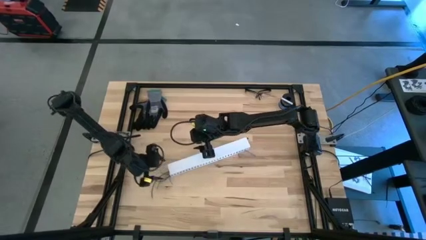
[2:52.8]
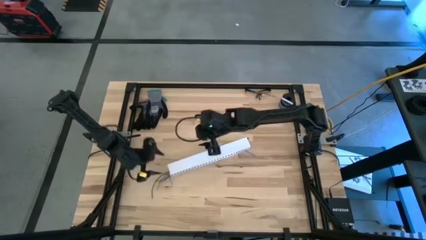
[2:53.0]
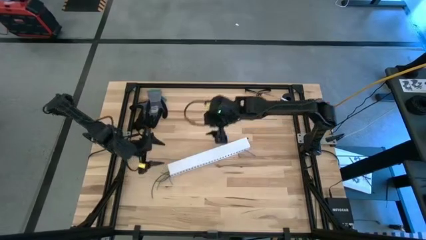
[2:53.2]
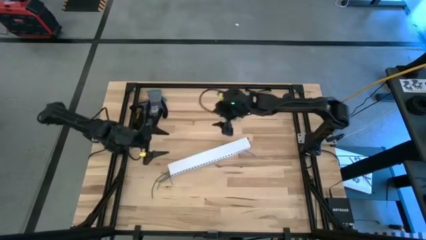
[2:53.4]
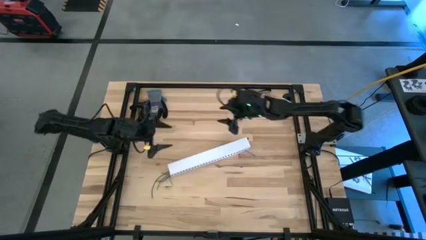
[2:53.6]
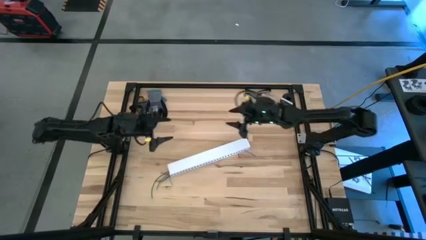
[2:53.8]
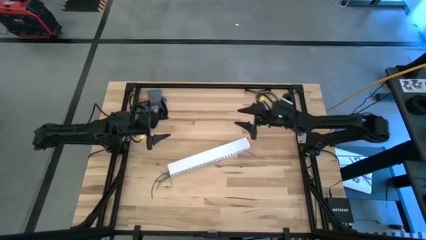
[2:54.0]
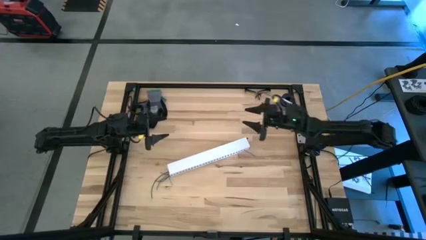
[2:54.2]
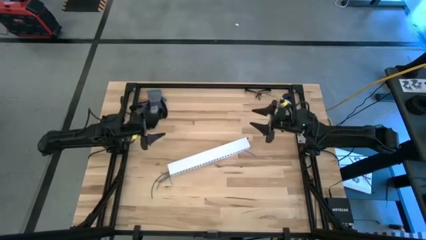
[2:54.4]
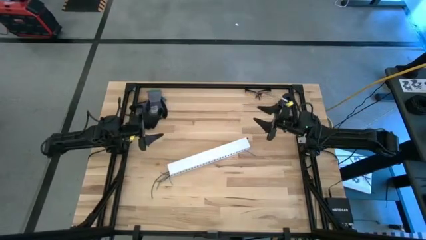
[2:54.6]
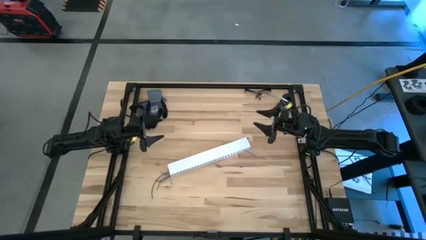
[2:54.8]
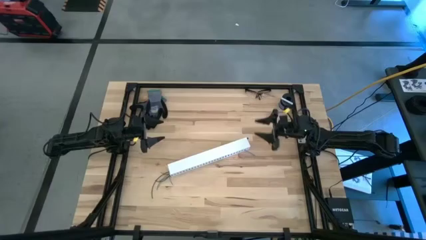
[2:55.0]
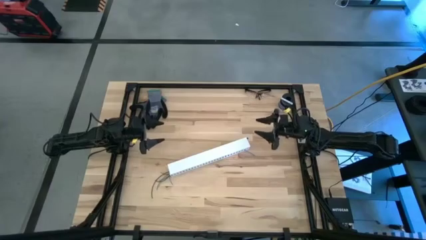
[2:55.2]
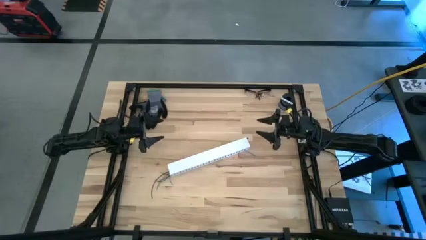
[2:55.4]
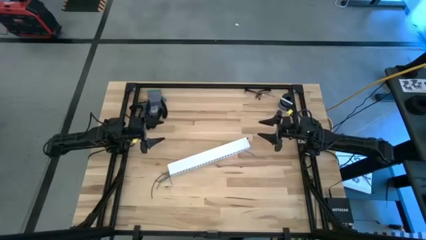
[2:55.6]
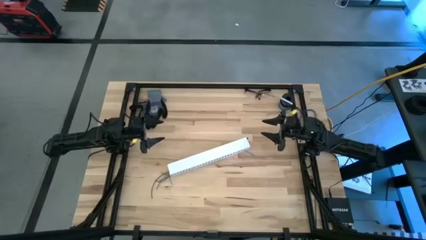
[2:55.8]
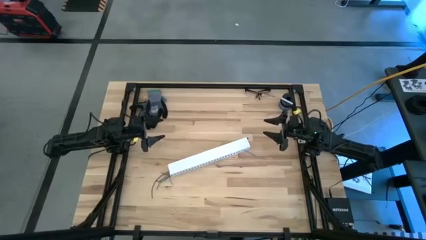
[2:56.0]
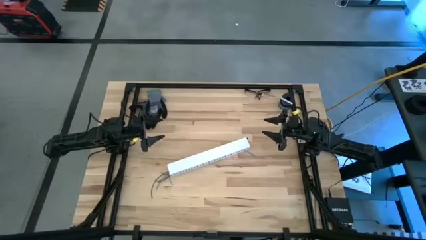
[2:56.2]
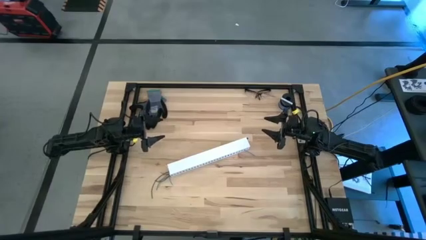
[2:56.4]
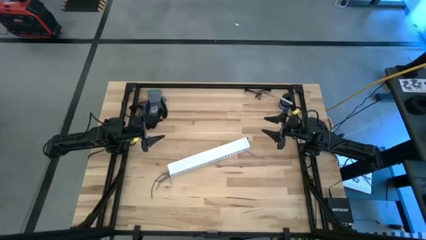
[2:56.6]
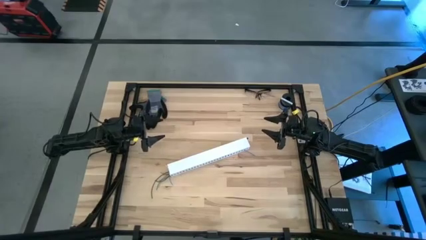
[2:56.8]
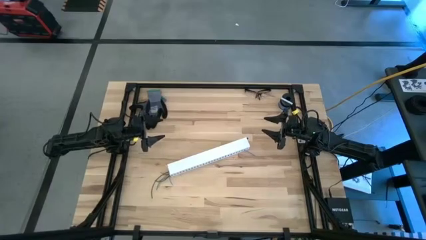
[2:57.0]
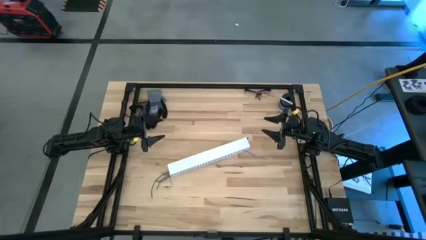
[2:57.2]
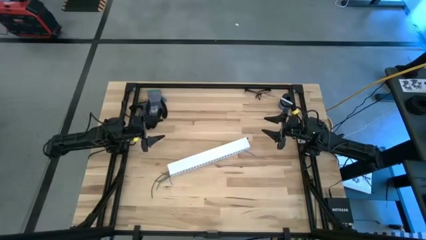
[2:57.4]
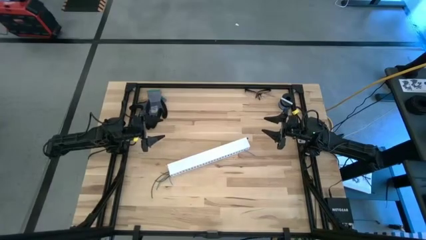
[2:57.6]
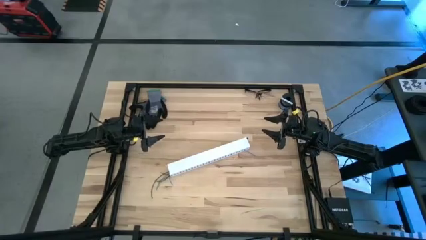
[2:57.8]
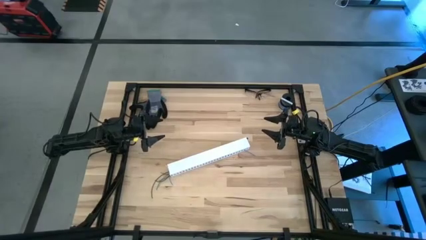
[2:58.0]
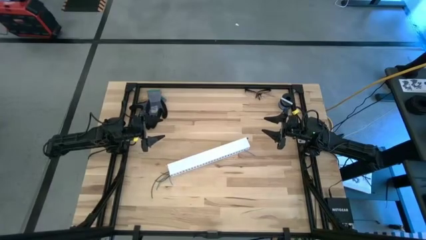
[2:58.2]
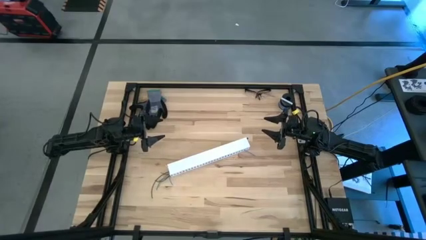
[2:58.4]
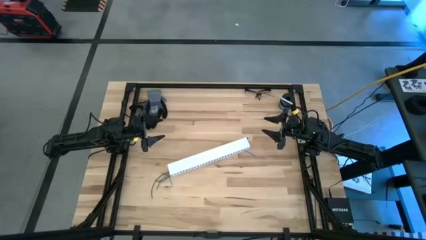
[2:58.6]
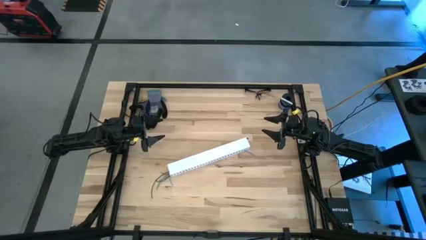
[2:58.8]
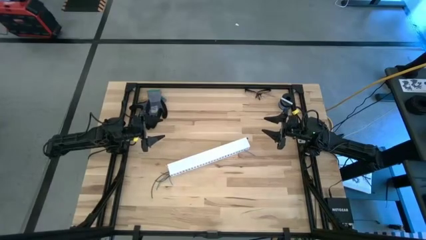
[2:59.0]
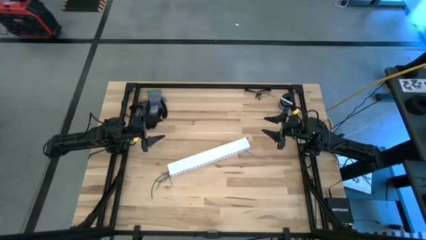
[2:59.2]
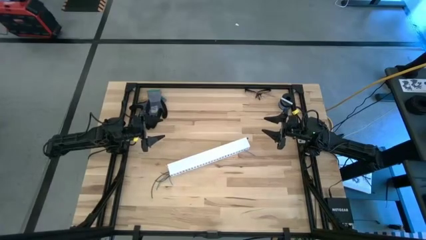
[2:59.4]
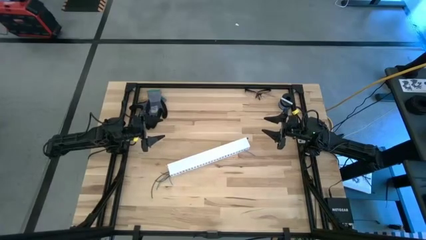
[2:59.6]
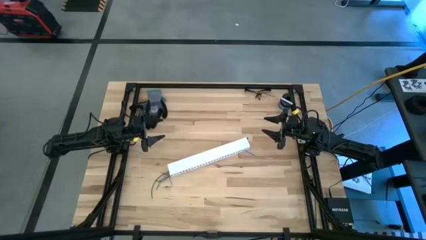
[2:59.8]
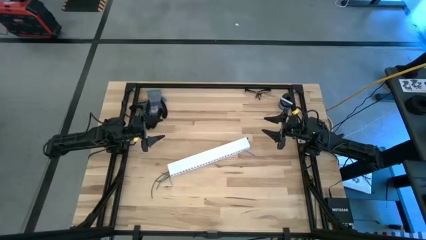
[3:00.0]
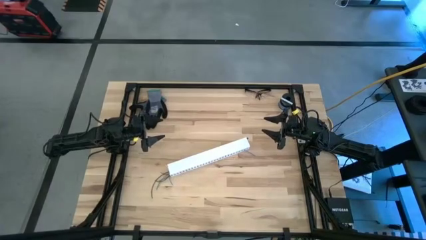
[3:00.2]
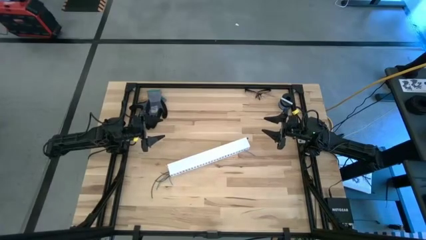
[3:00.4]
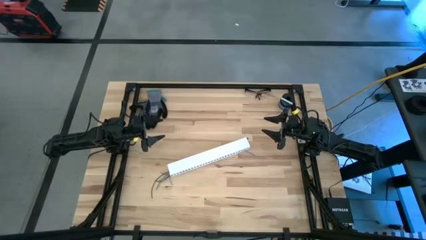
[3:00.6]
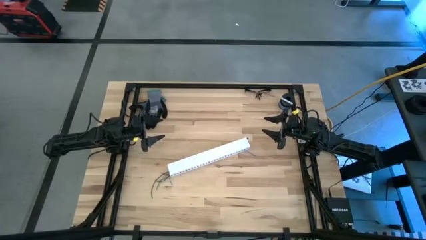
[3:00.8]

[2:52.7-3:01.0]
Task: Ziptie cables
Return to Home Position

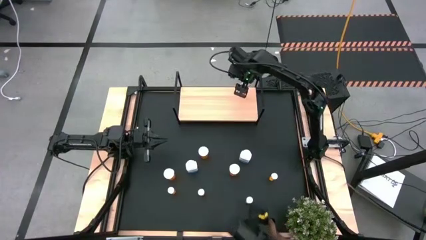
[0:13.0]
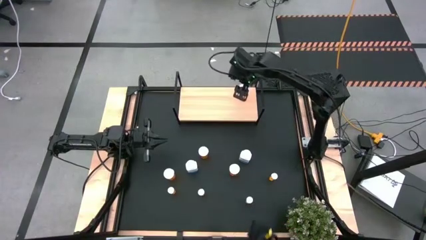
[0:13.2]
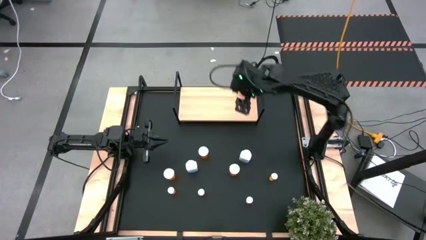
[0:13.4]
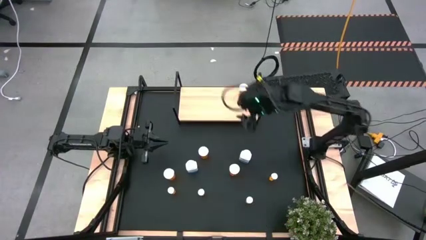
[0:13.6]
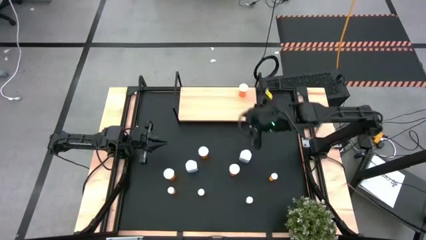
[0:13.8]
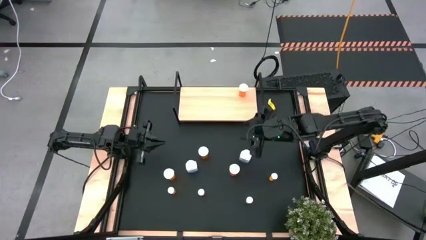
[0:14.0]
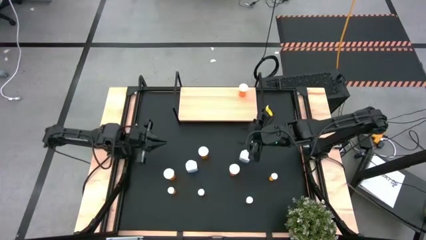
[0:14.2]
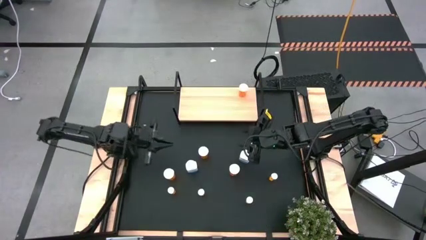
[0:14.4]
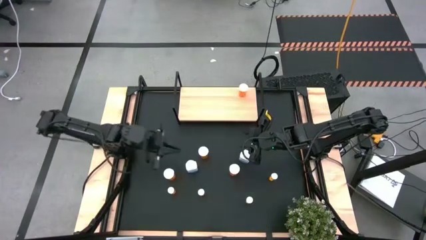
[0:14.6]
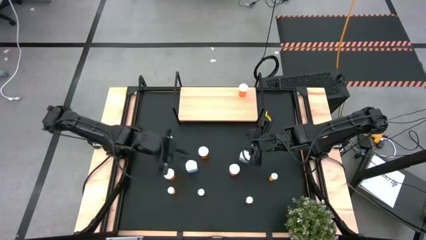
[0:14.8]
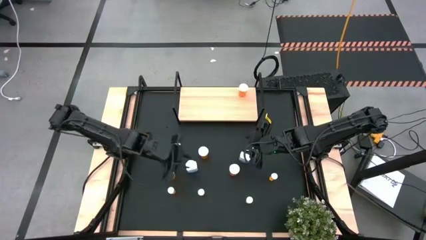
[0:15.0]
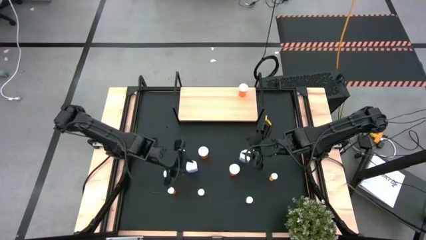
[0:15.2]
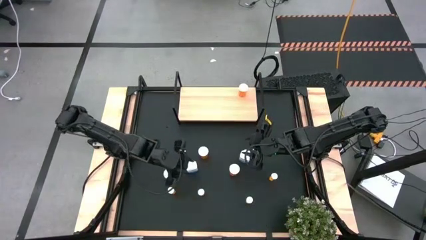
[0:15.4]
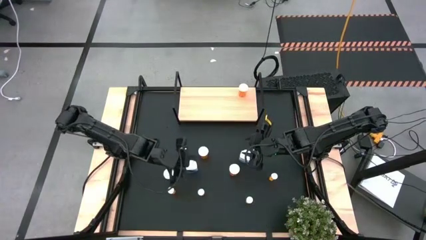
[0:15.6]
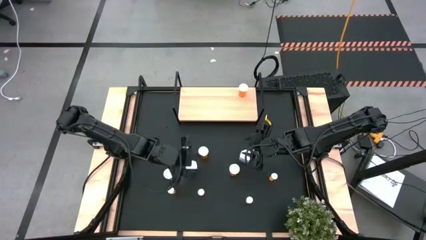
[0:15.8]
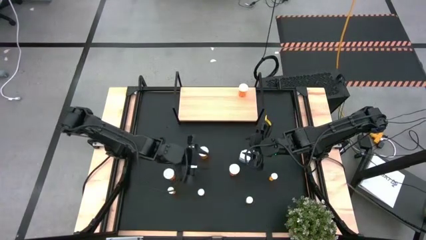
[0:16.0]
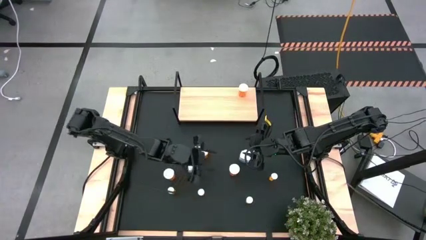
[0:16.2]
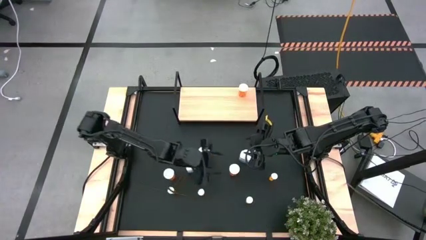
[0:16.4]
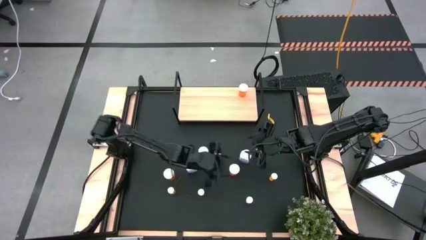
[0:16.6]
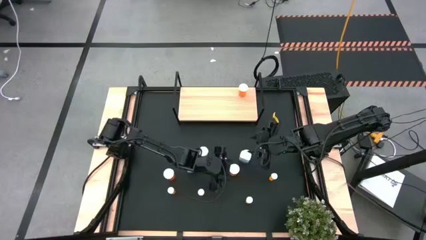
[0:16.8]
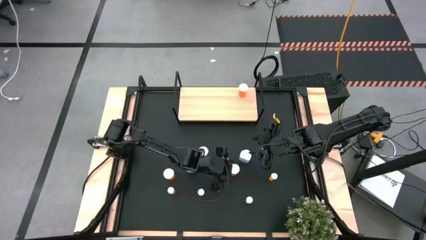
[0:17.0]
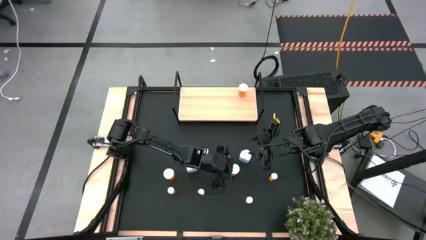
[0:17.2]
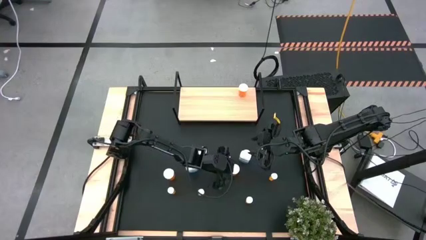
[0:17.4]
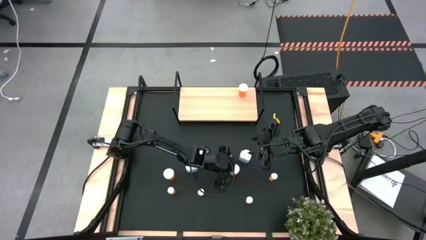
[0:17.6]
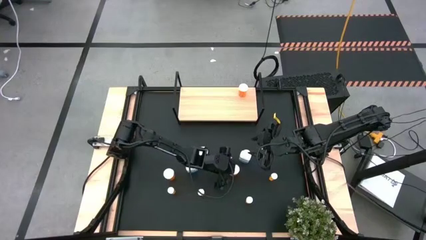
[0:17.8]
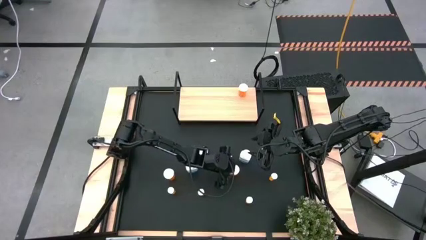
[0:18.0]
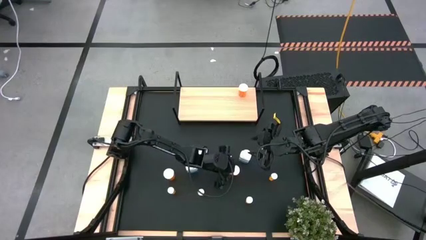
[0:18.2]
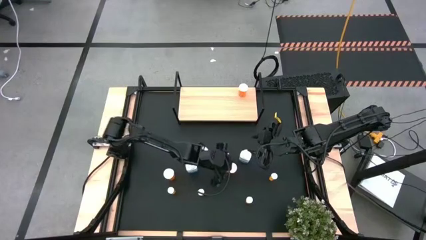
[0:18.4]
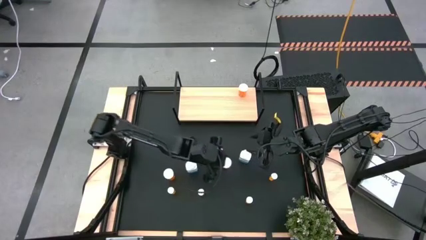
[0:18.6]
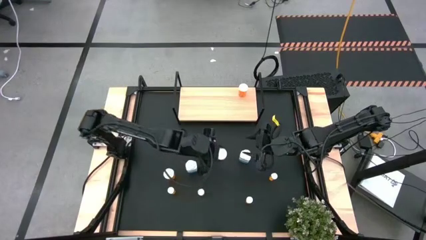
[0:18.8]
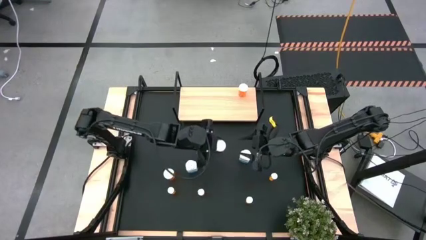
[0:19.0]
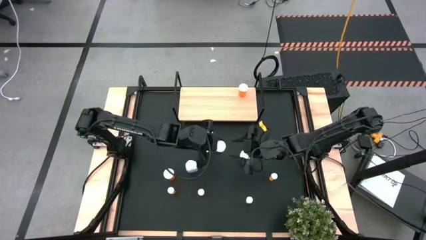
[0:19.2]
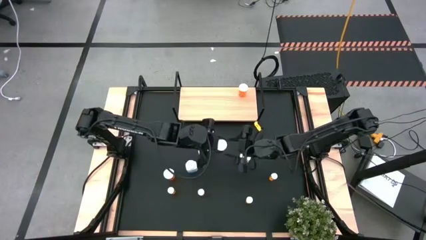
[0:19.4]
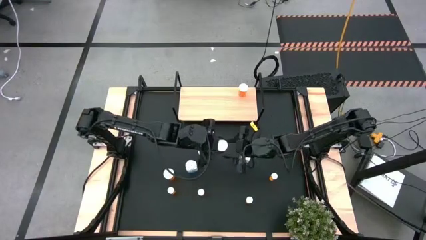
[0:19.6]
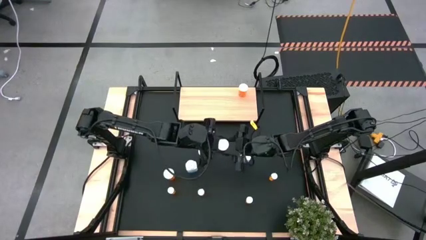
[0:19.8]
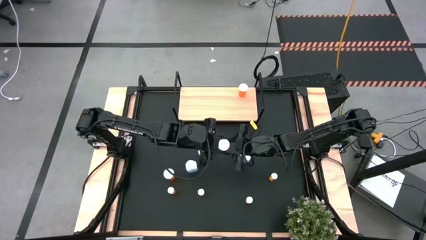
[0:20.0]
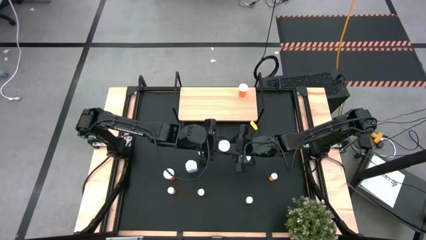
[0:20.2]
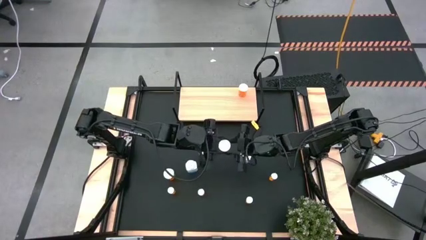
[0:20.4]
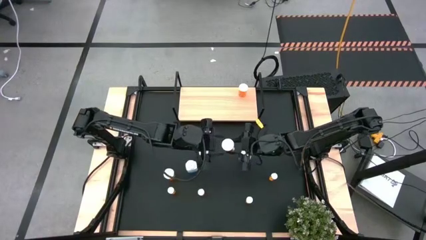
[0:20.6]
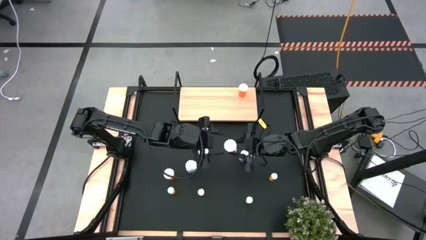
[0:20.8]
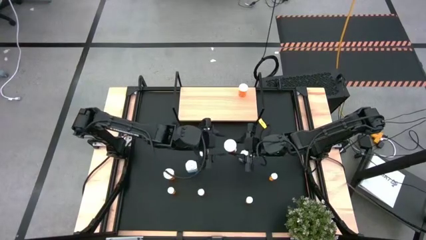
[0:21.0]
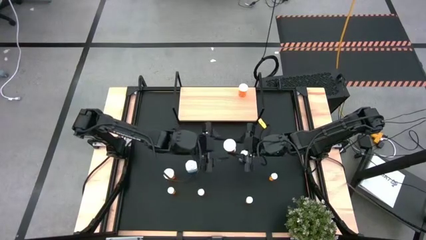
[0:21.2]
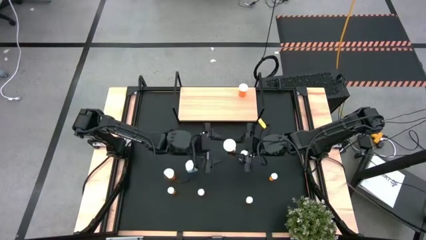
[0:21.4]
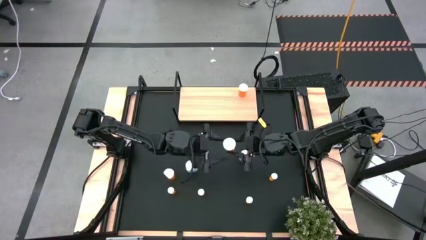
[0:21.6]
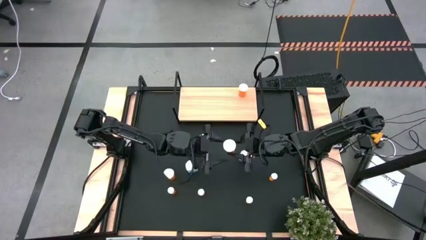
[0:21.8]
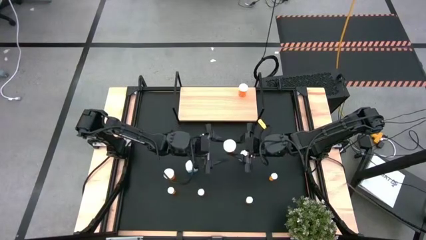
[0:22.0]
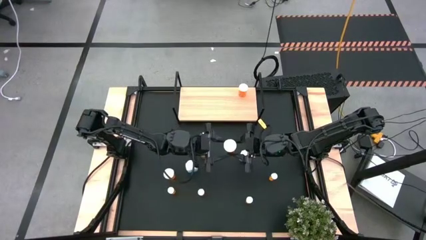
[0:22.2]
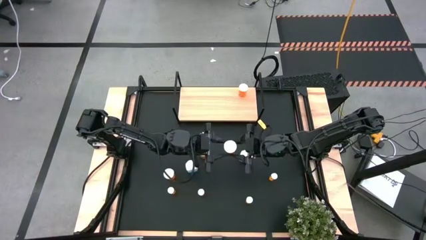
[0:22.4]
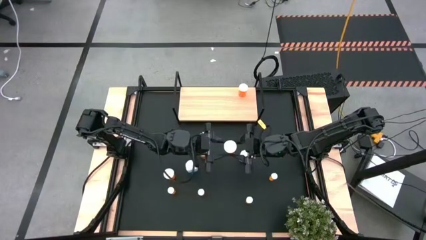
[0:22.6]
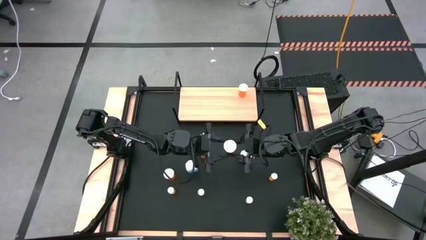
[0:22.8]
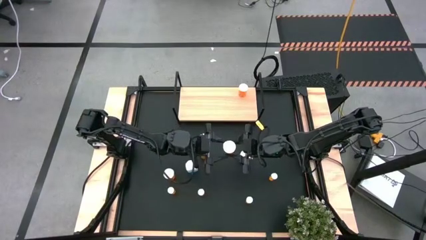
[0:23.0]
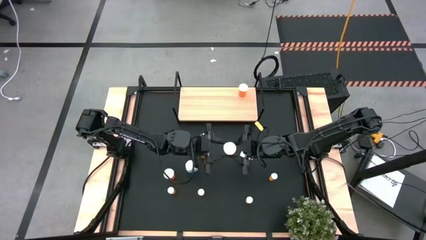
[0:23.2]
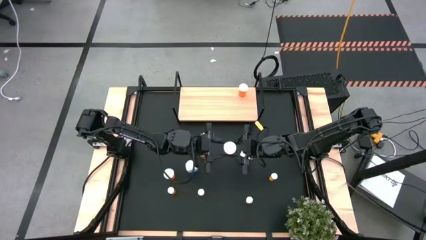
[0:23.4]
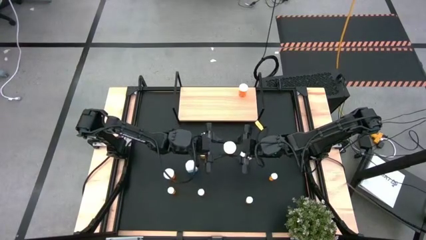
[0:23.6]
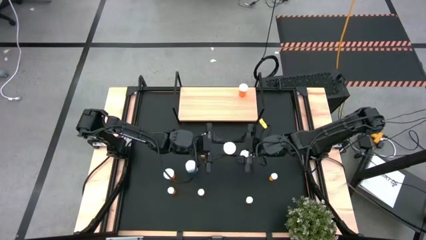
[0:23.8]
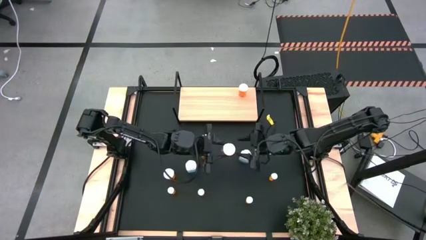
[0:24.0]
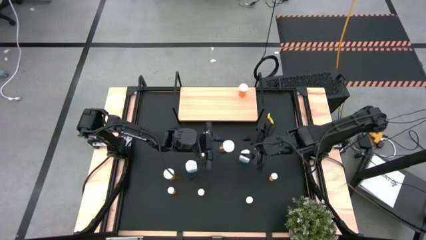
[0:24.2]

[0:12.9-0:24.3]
Task: Pick and place medicine bottles onto shelf by color
Put the bottom right big orange pill bottle aligned with the other big orange pill bottle on the shelf
